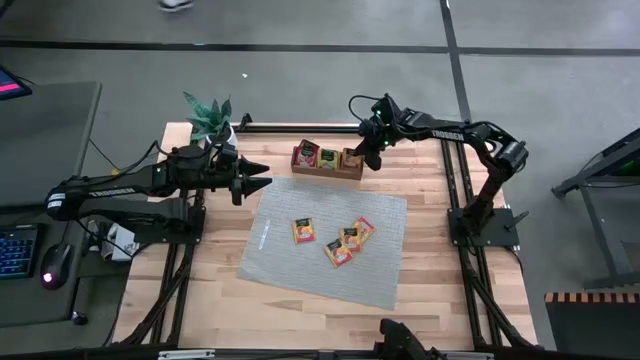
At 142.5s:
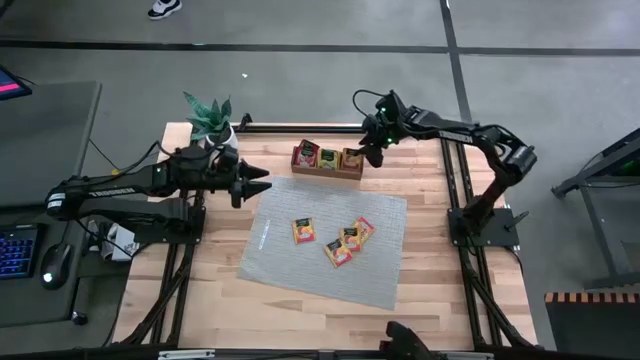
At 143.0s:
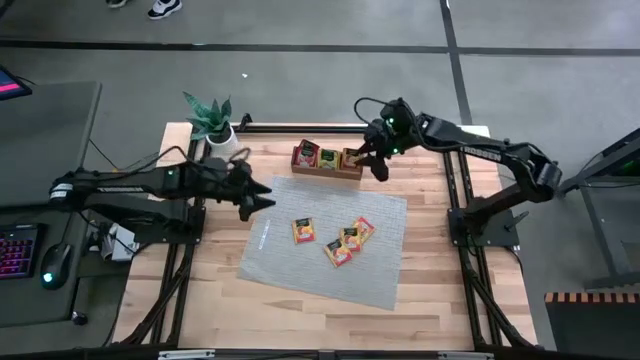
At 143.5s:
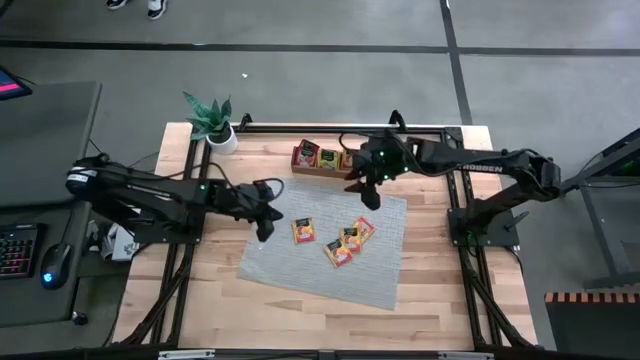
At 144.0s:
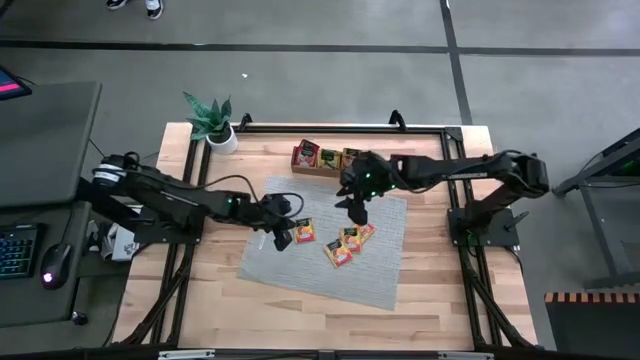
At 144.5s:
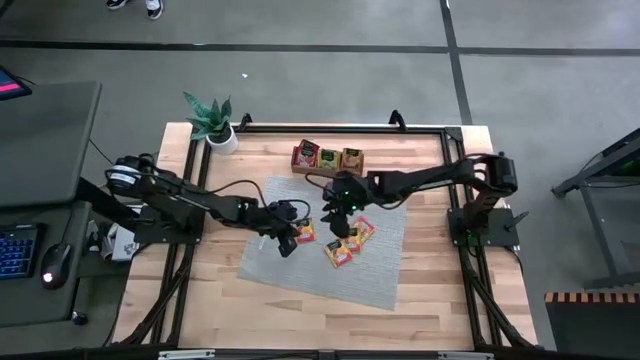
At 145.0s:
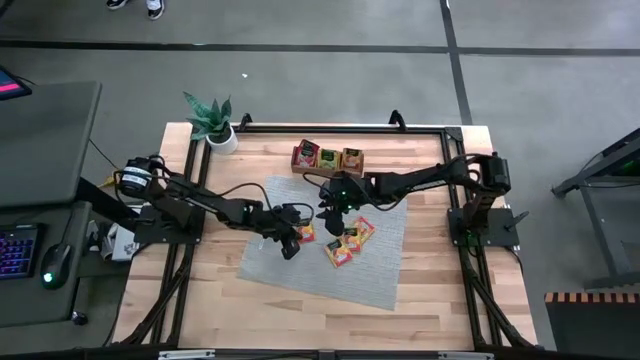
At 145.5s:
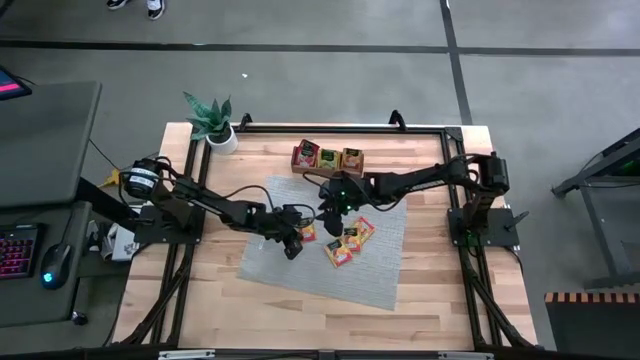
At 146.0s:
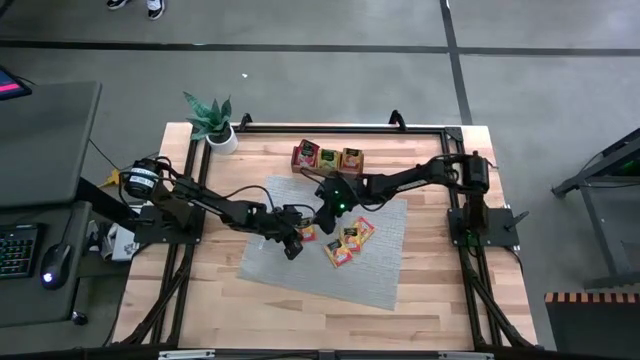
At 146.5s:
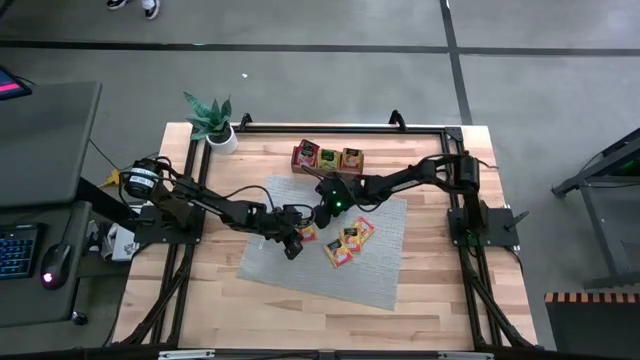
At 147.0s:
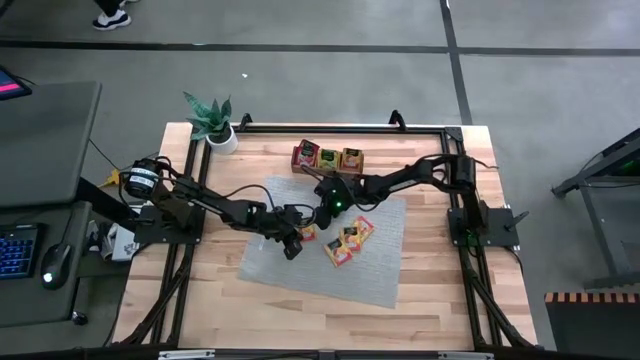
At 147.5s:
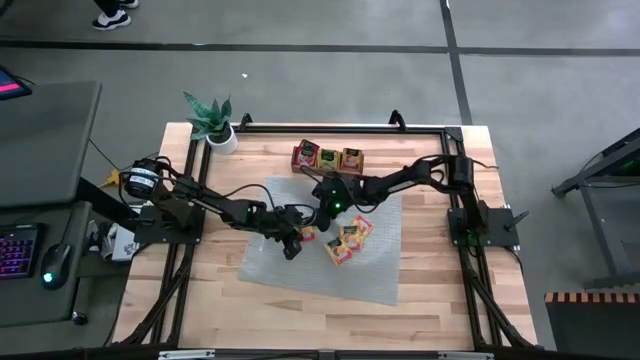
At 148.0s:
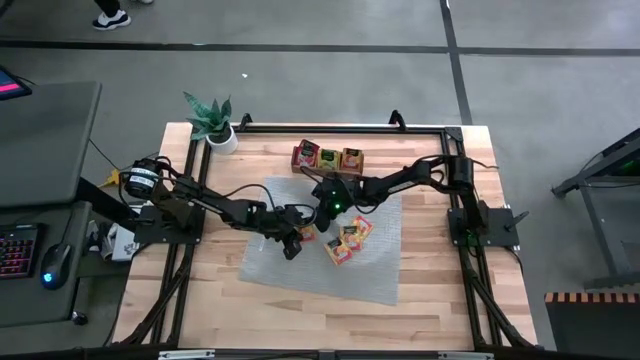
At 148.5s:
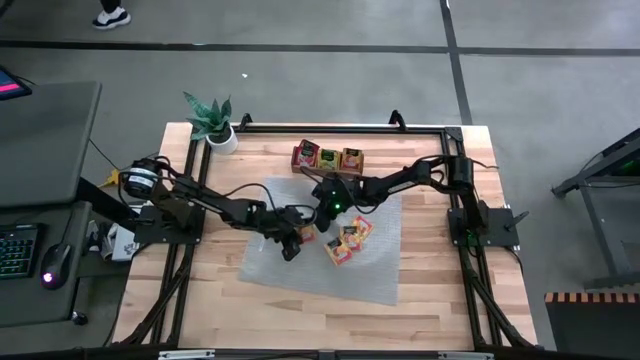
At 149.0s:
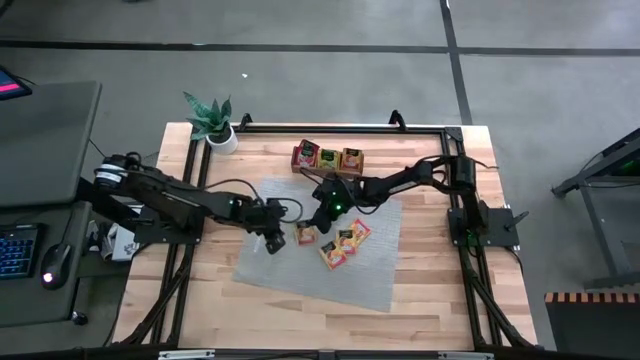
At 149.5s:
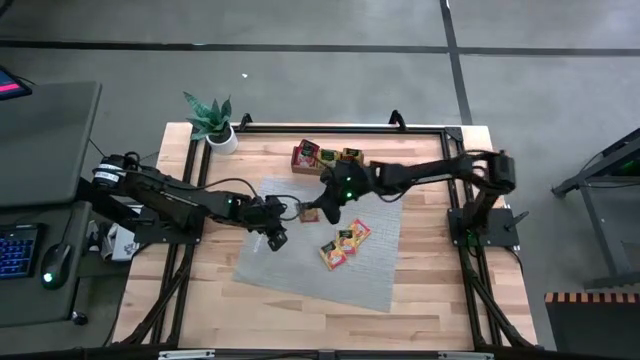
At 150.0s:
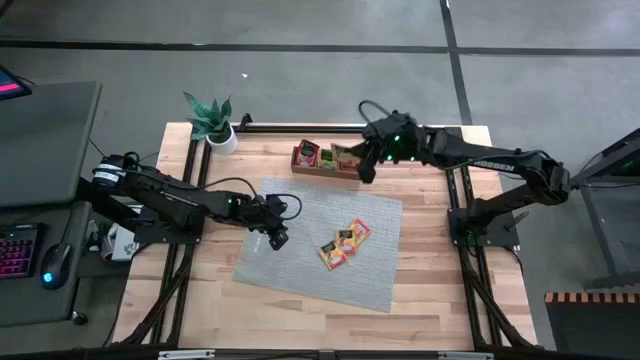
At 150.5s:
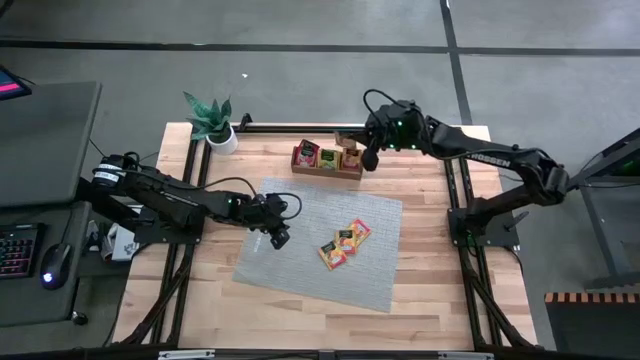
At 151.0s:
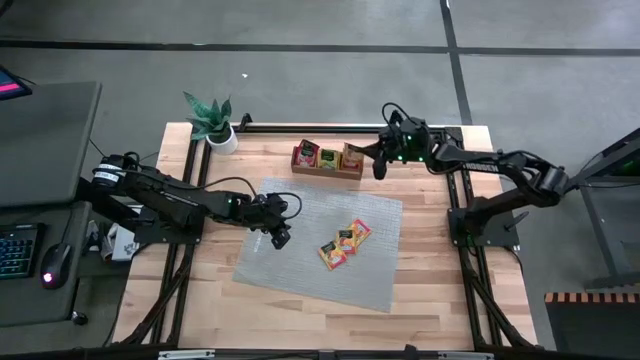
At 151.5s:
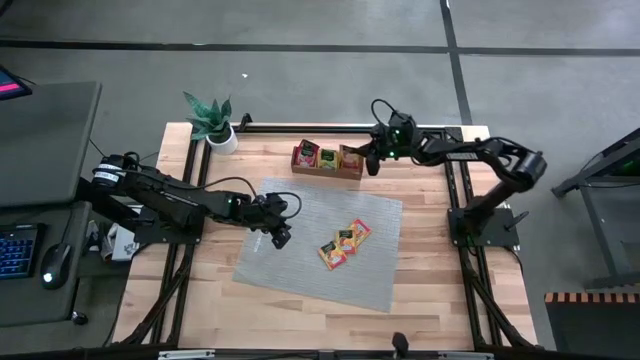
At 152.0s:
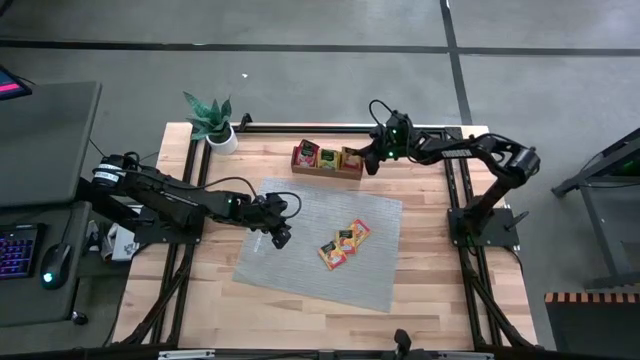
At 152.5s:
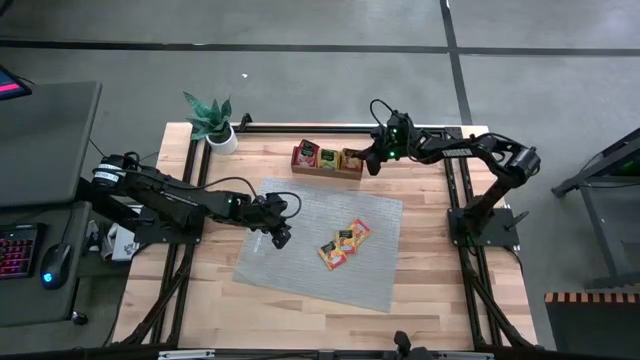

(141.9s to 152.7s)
Task: Pick & Place Tea
Put the orange tea bag into the right section of the wooden organizer

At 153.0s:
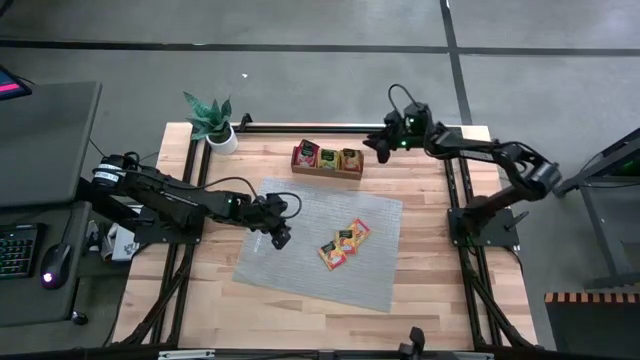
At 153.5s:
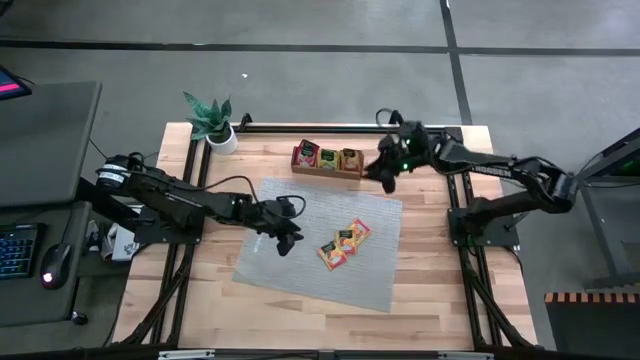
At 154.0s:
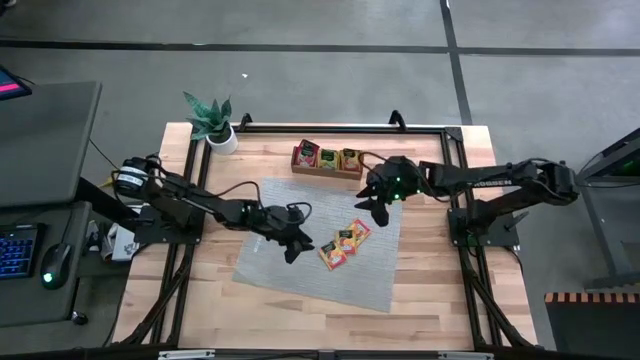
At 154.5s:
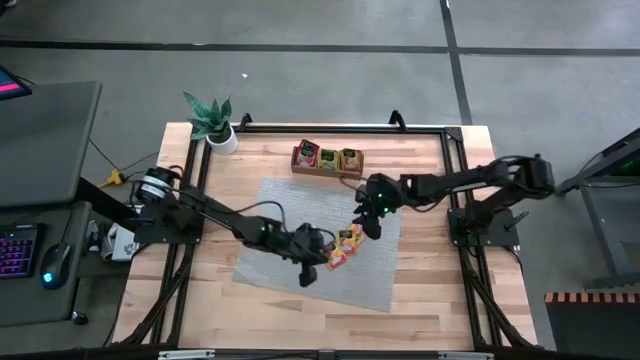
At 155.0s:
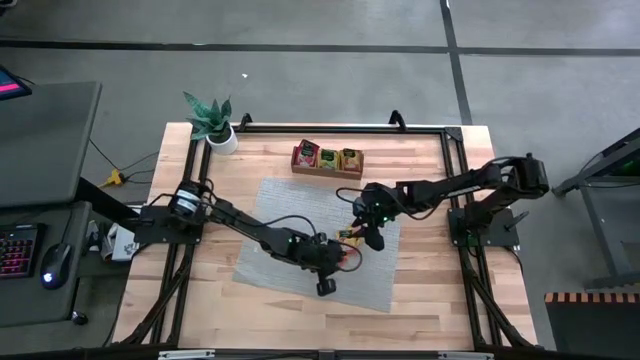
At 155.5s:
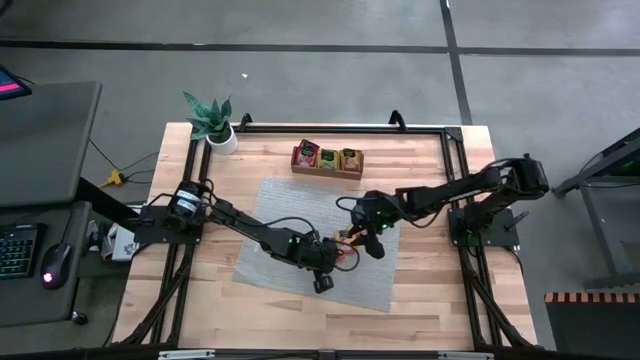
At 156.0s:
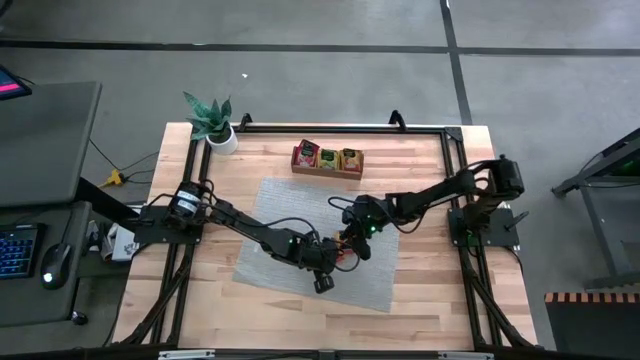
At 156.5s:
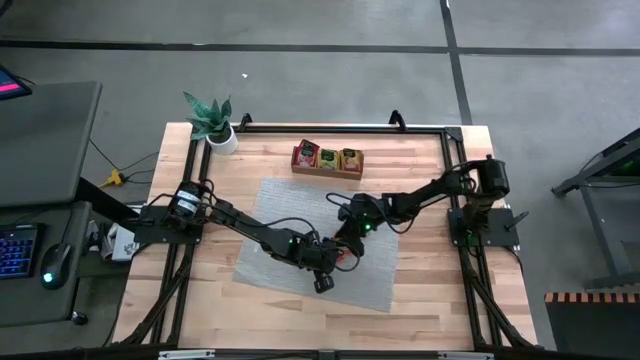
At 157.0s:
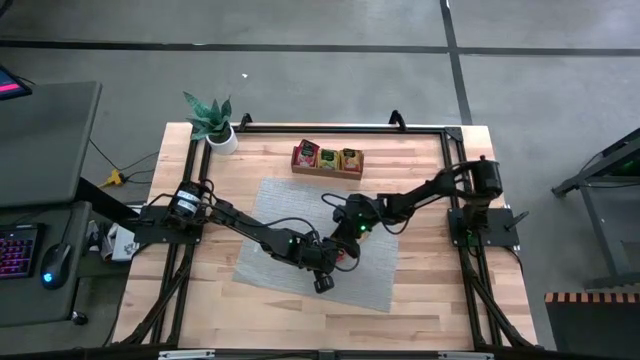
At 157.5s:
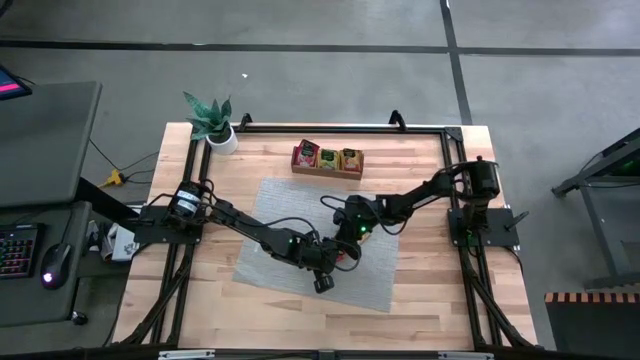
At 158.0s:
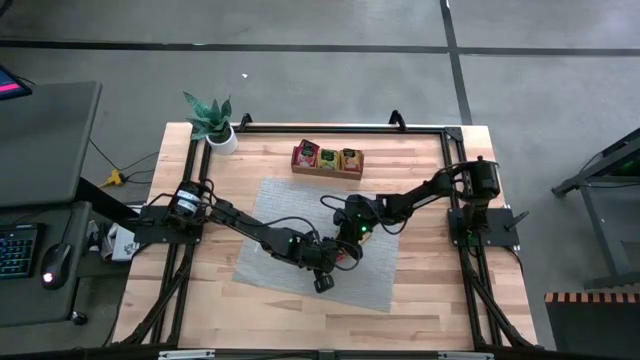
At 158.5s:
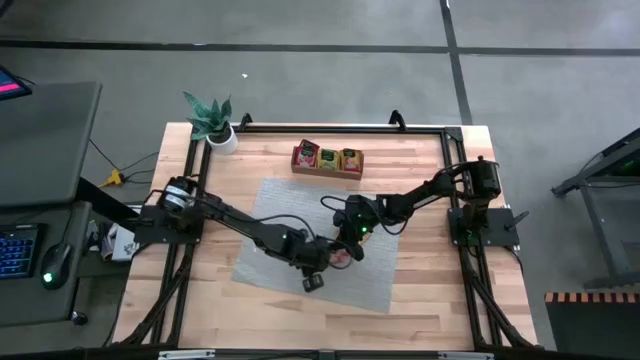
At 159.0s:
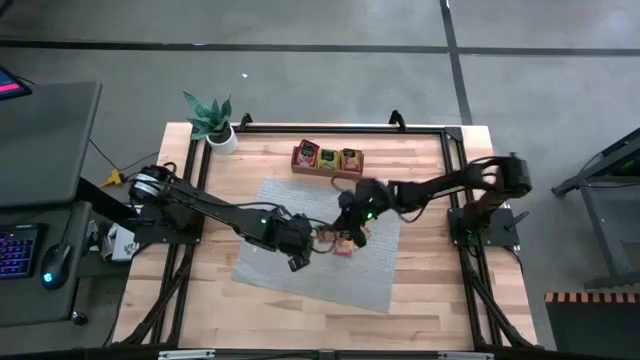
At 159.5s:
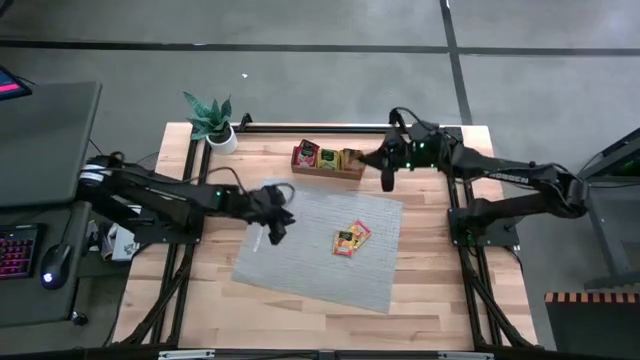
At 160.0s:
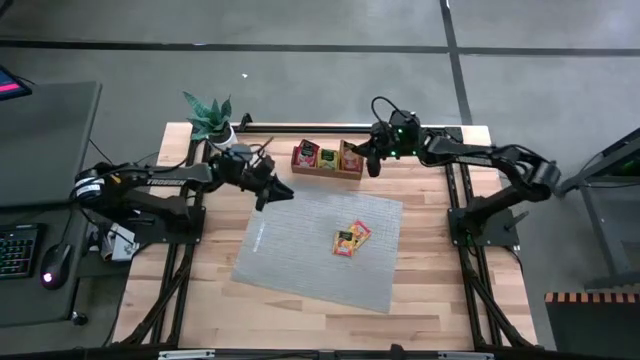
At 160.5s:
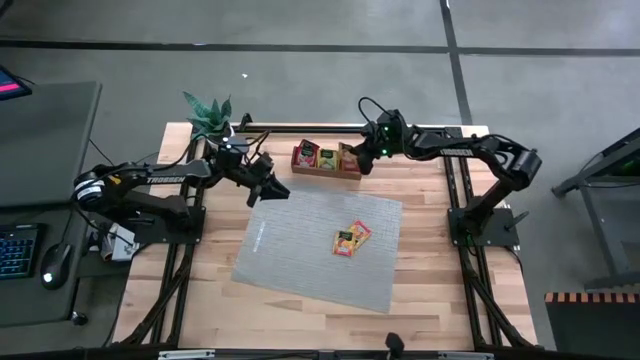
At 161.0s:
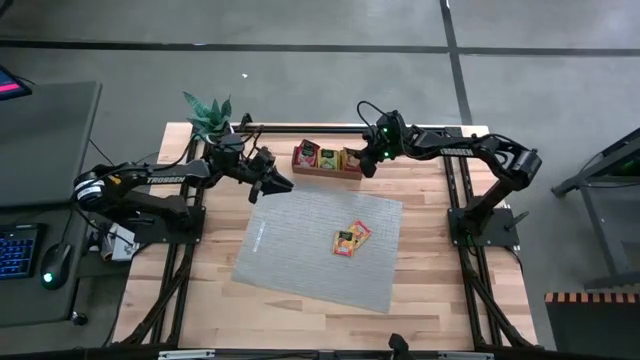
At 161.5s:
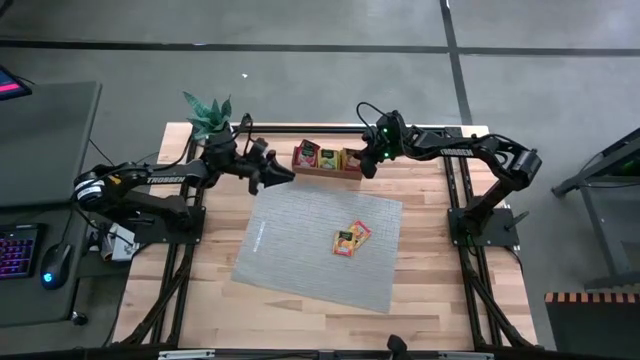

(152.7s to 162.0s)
Put the orange tea bag into the right section of the wooden organizer

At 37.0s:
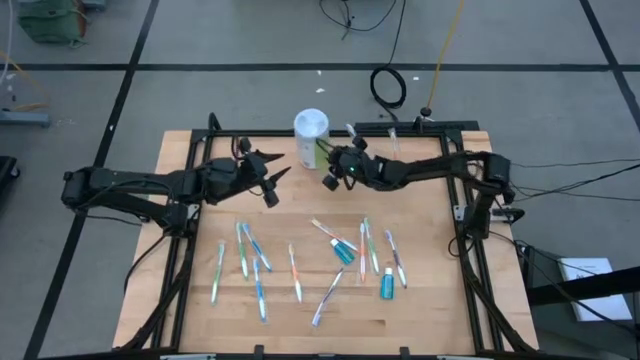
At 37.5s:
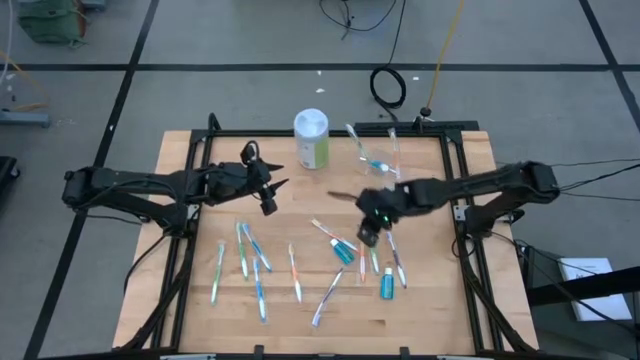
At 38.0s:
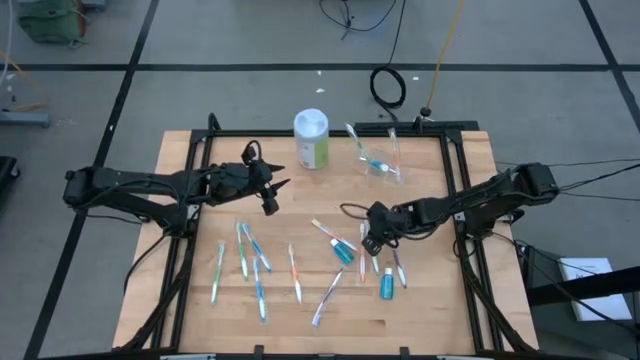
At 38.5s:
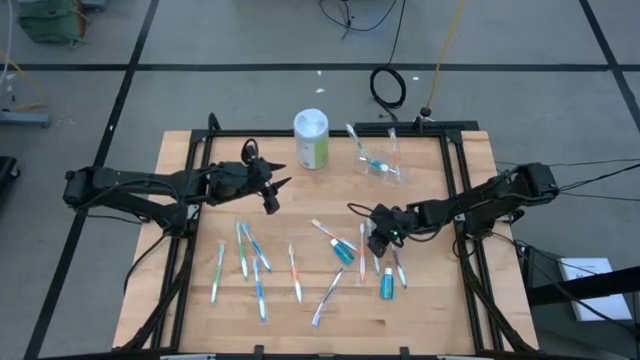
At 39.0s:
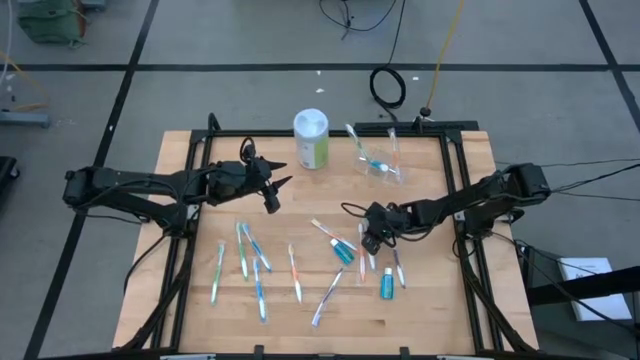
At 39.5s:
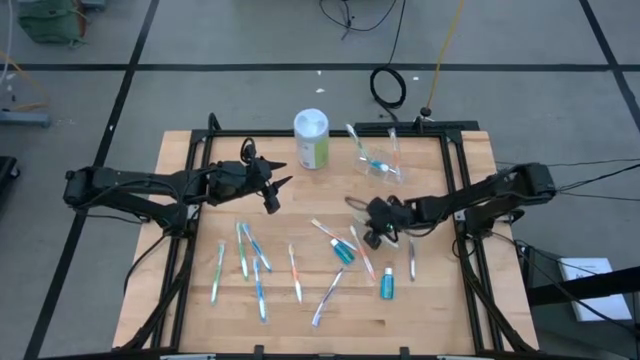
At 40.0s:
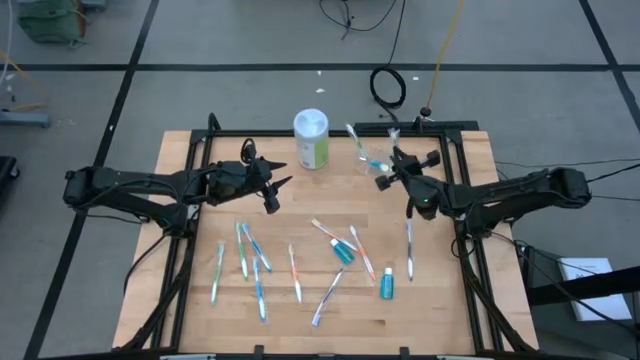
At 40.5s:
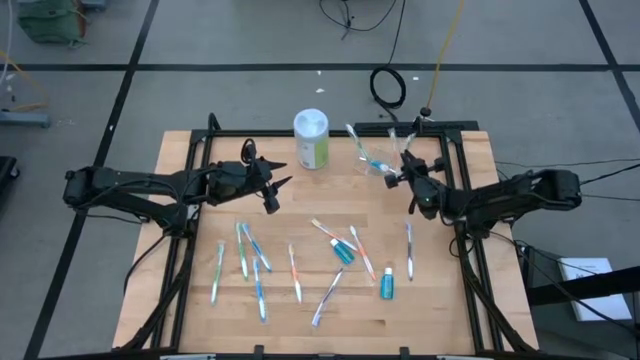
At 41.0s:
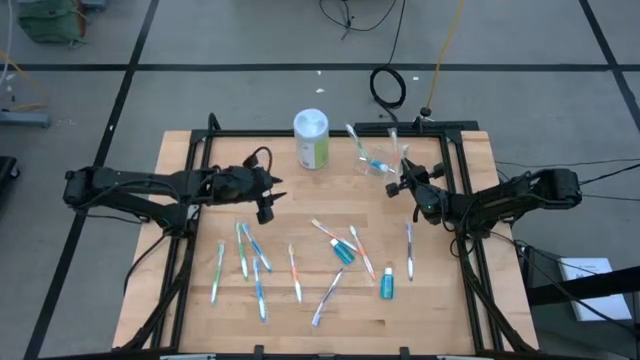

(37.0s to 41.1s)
Task: Pick & Place toothbrushing station
Put the green toothbrush into the transparent organizer
